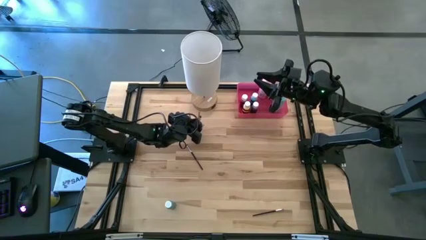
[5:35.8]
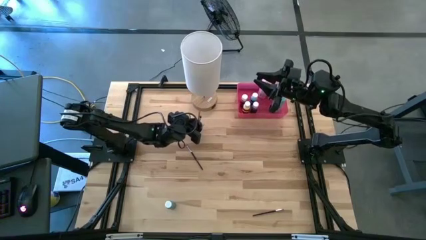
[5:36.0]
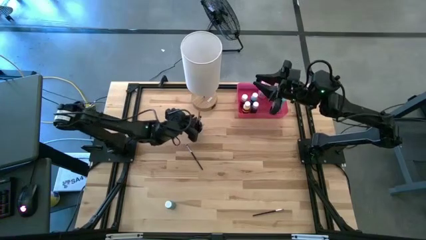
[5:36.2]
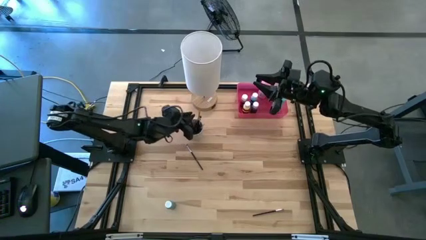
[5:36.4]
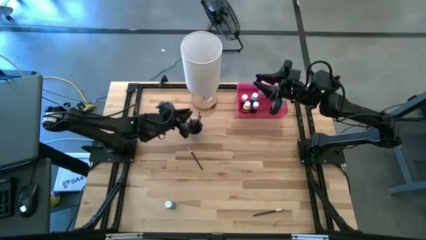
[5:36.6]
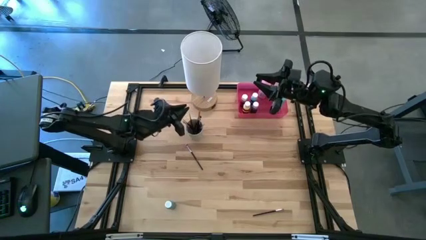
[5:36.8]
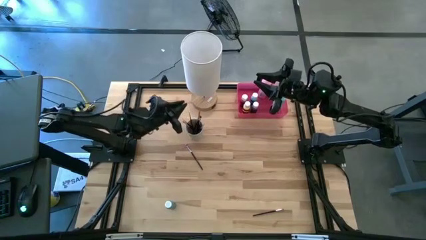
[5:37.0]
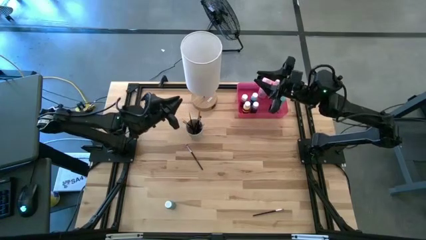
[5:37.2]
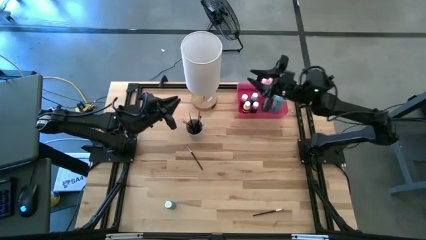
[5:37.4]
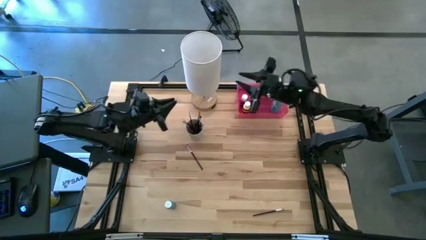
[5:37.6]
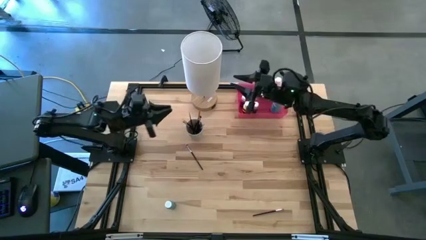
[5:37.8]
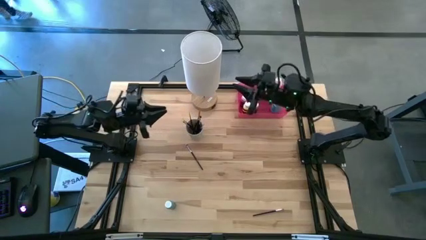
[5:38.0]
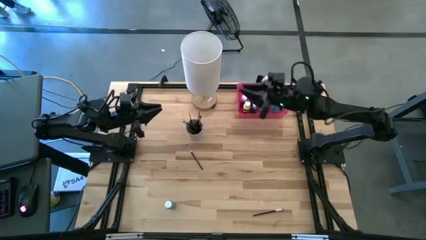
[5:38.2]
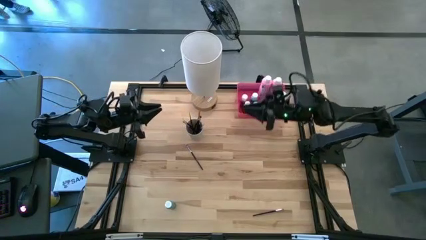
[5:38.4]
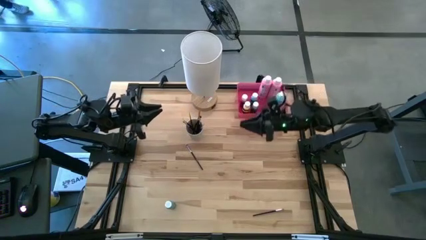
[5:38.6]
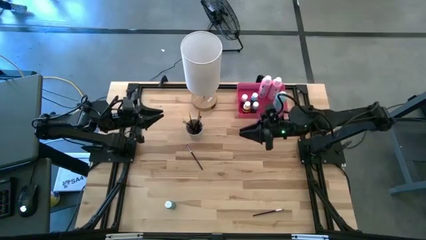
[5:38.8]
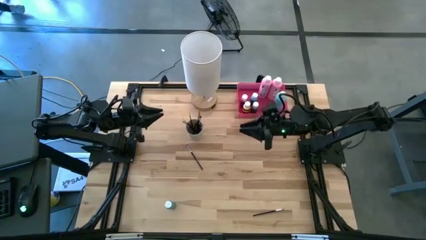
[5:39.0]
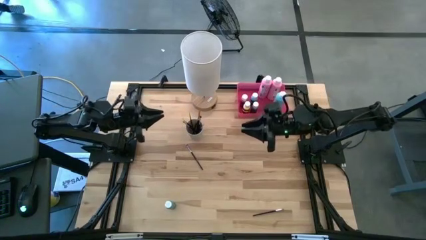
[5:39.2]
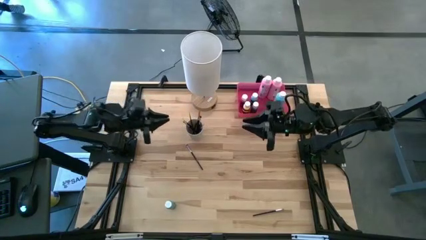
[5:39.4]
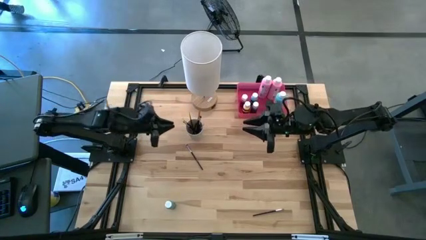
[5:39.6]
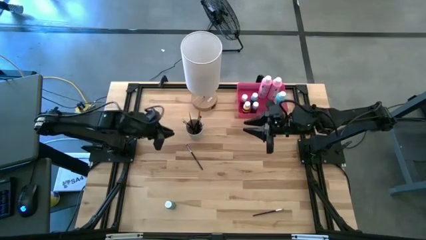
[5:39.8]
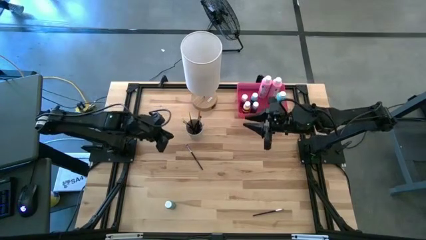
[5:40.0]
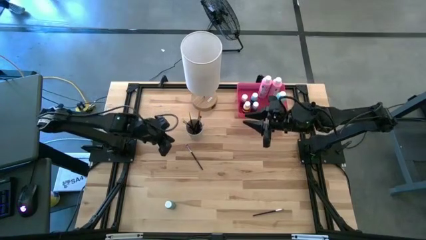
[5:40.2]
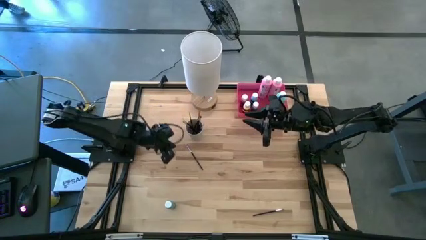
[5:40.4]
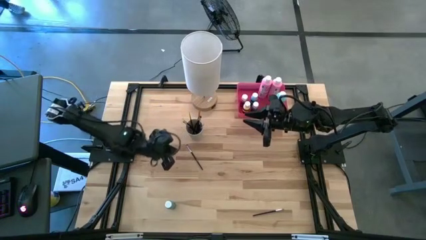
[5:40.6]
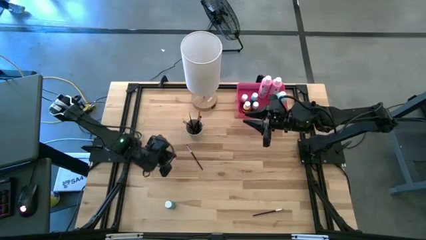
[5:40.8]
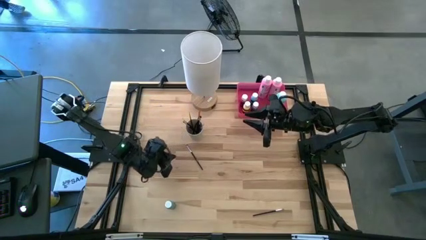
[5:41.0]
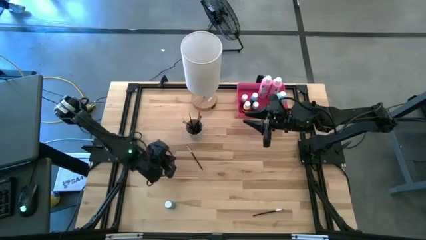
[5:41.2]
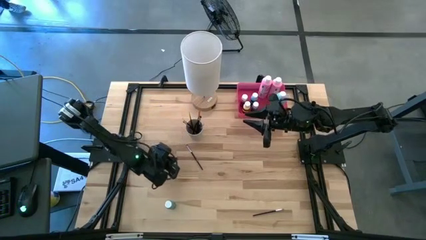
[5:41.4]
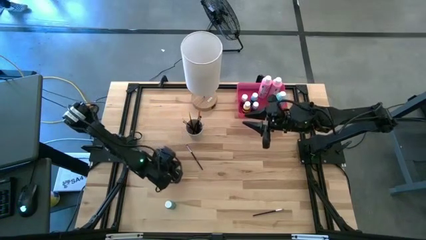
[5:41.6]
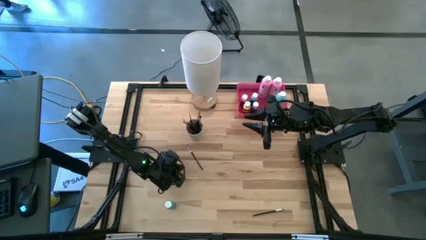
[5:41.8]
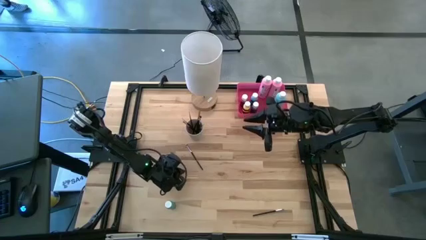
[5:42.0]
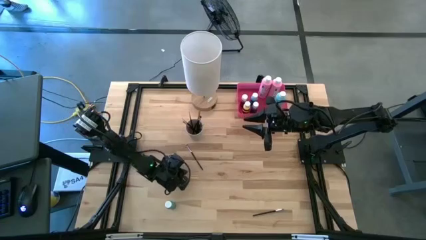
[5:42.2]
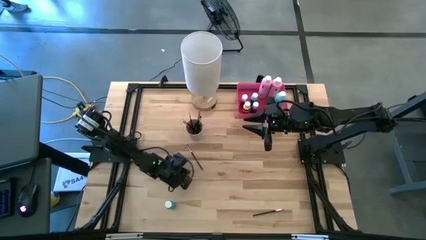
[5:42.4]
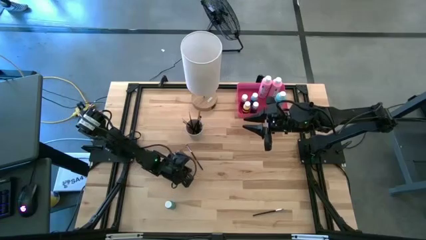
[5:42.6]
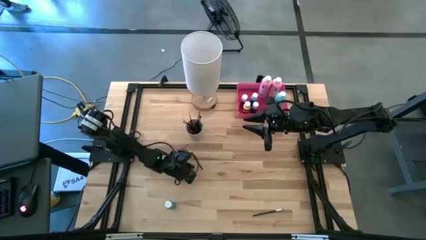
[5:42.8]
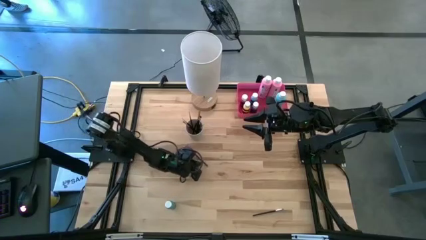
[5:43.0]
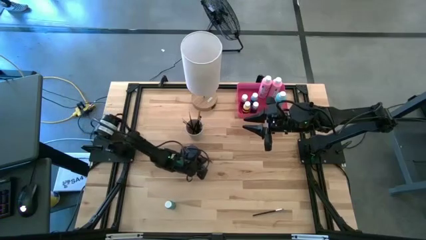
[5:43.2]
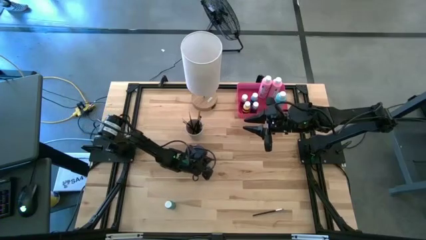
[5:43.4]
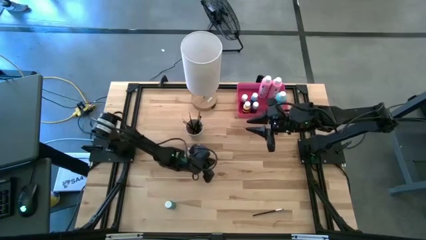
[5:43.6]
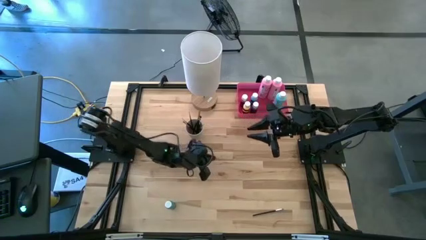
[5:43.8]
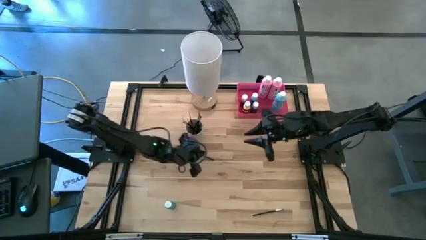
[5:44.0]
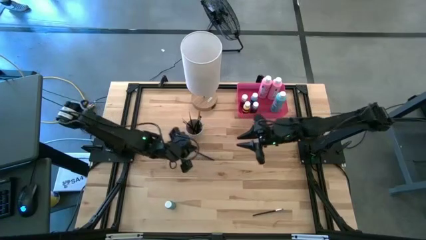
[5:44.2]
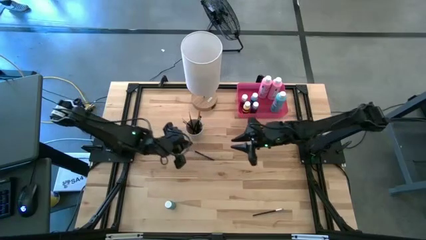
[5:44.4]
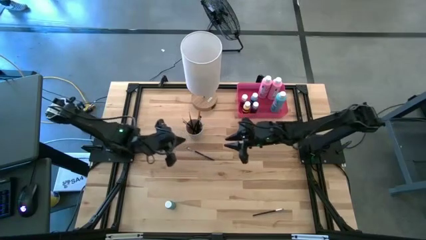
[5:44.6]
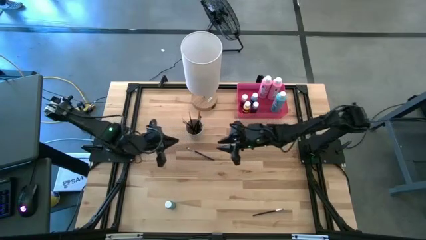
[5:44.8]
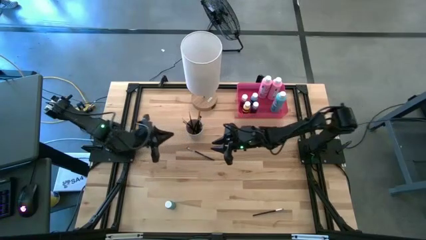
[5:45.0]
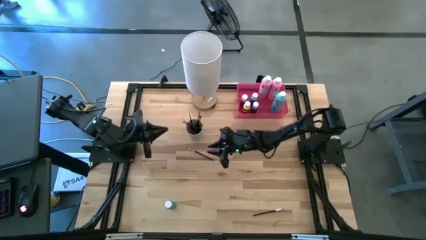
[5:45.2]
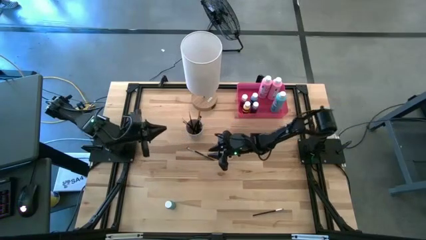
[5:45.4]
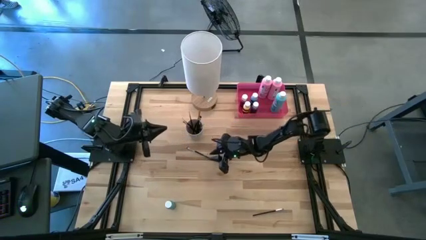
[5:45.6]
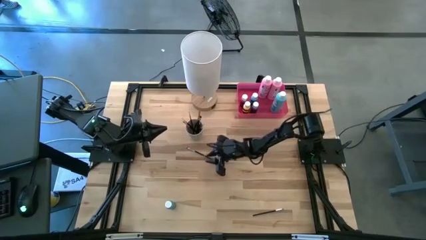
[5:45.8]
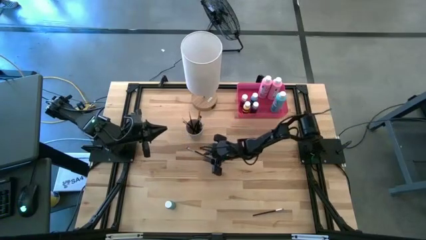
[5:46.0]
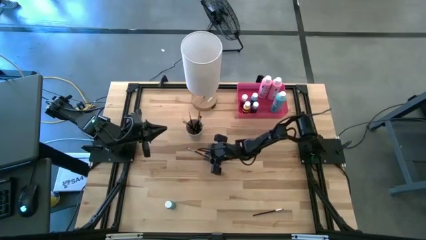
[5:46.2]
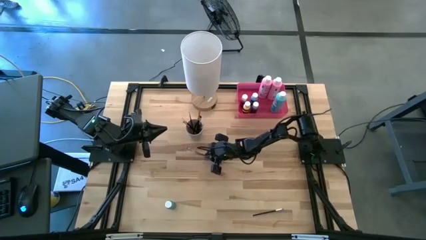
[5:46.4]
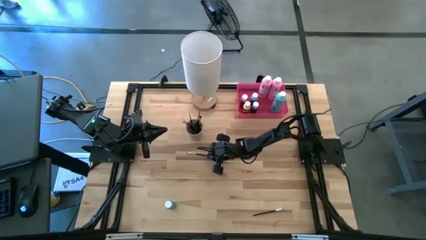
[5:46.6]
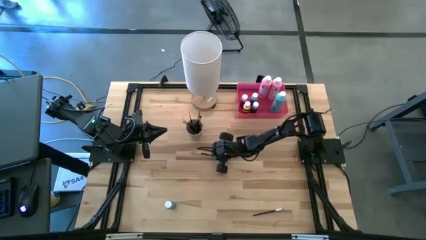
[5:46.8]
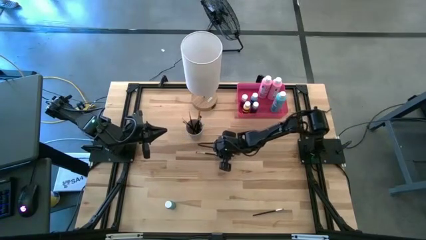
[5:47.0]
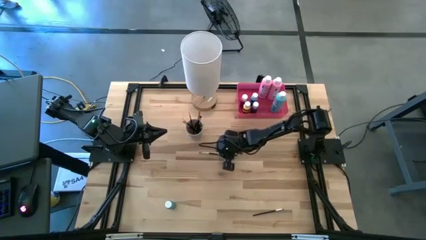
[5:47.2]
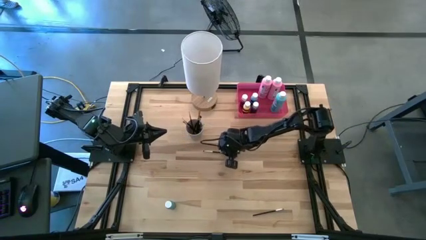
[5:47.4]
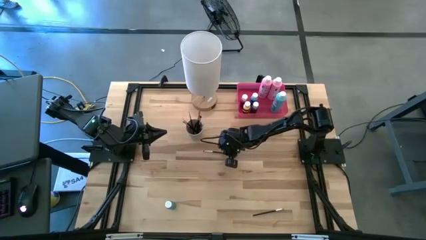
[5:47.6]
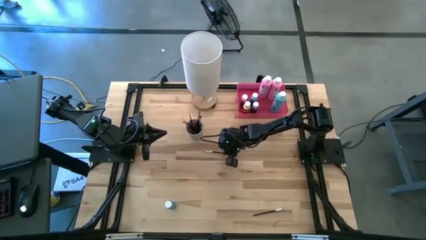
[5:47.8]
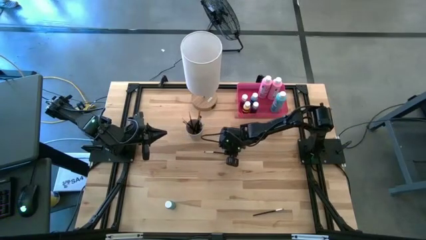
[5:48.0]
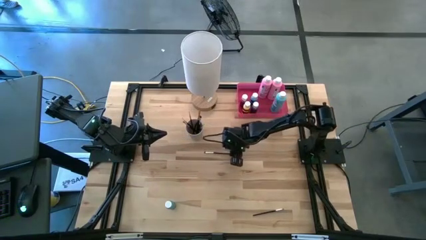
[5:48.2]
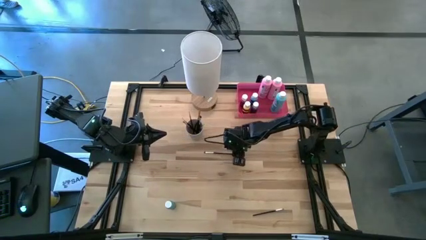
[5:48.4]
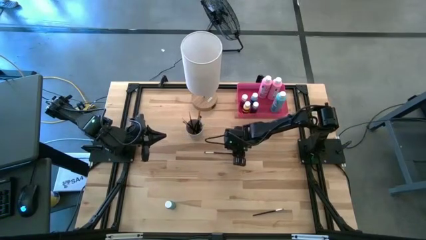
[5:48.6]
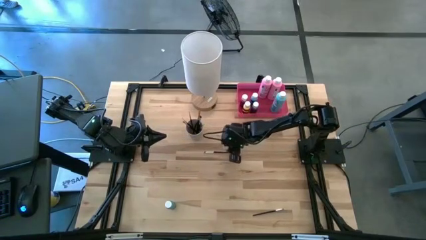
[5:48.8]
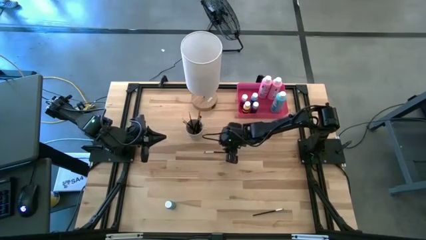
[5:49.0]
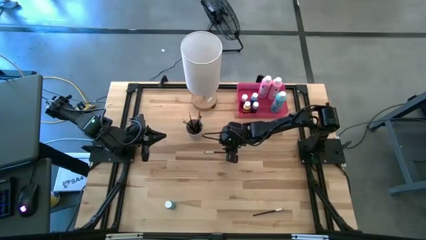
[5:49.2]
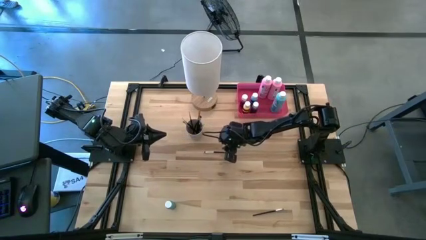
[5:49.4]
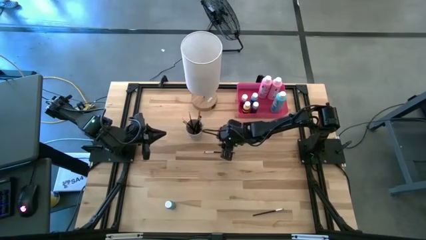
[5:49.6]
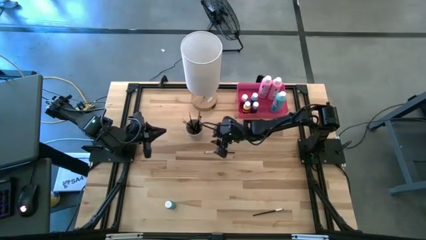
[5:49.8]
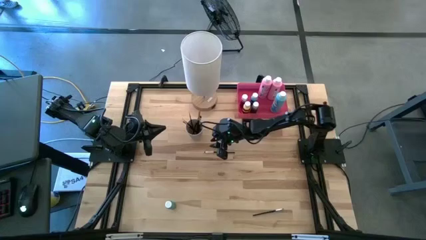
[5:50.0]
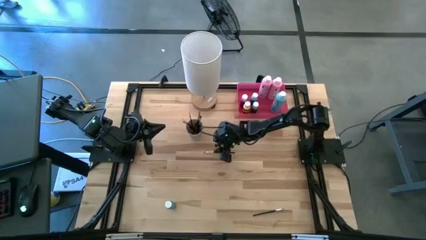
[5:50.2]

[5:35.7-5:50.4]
Task: Pick & Place Paint Supplies
Put the silver eyeshadow brush into the white cup
